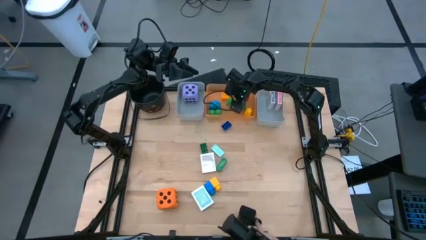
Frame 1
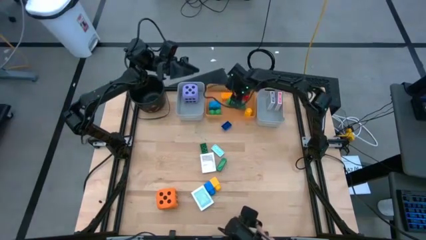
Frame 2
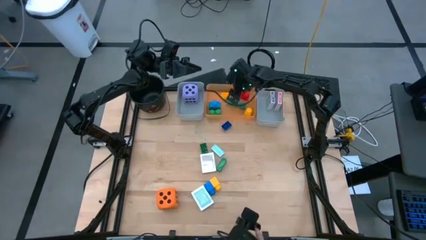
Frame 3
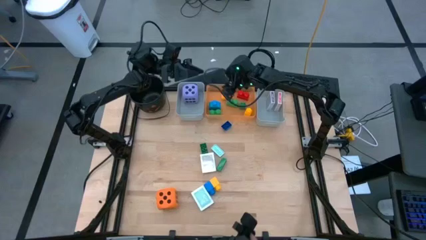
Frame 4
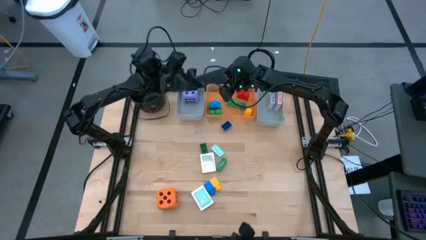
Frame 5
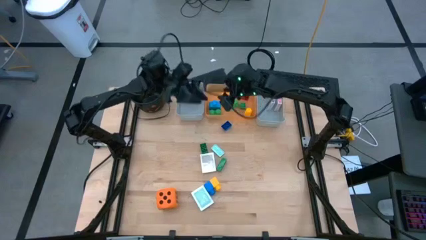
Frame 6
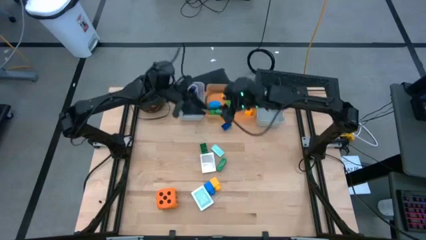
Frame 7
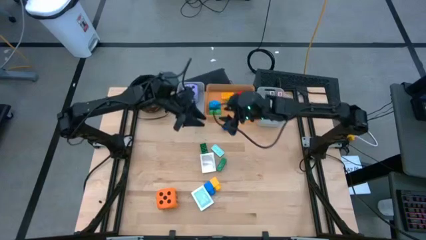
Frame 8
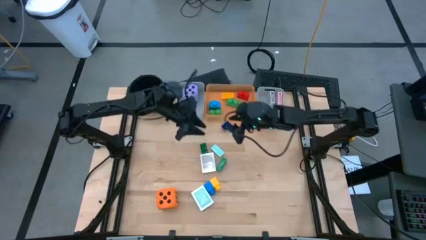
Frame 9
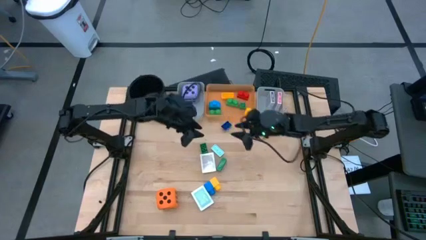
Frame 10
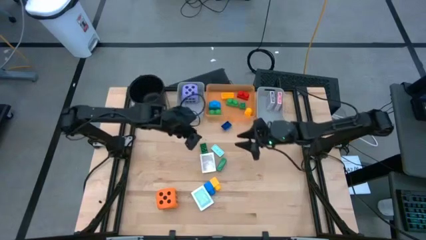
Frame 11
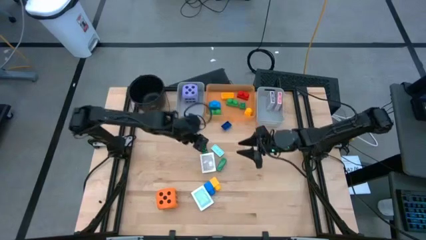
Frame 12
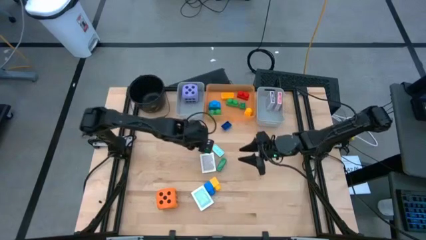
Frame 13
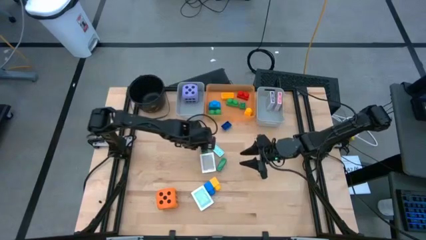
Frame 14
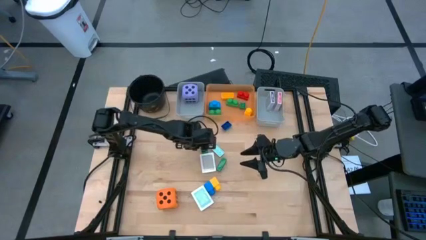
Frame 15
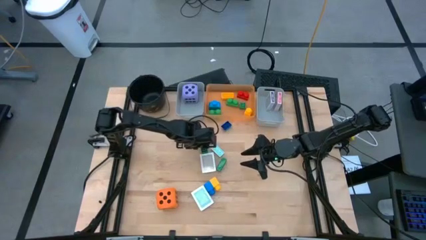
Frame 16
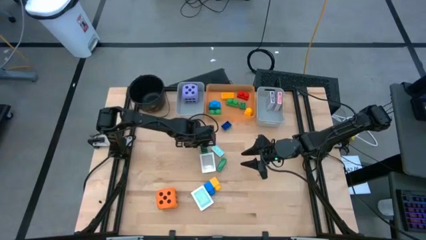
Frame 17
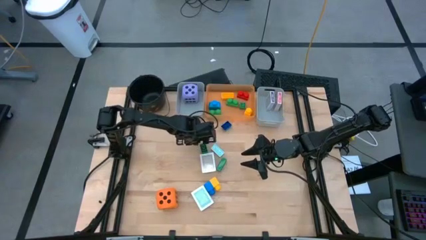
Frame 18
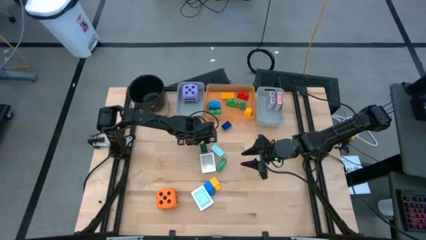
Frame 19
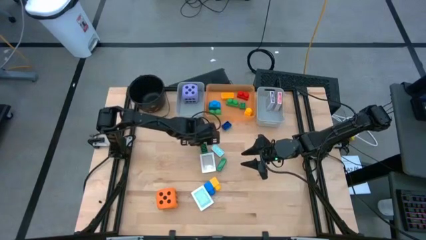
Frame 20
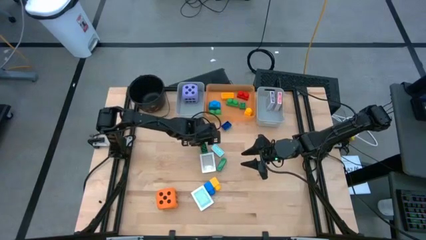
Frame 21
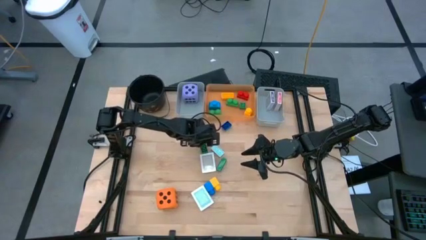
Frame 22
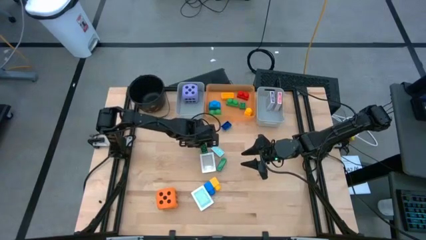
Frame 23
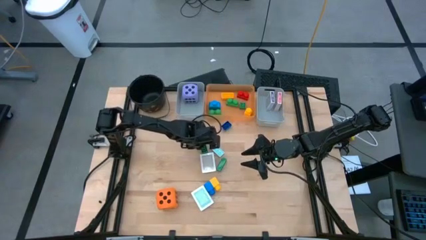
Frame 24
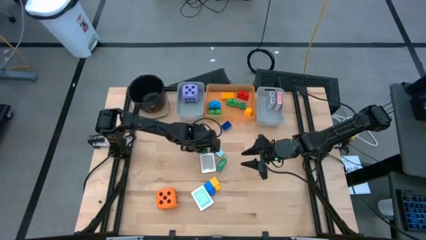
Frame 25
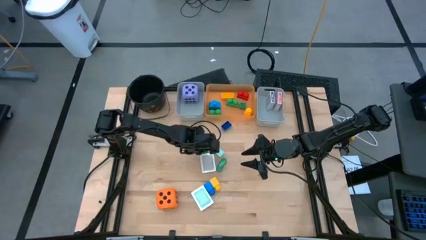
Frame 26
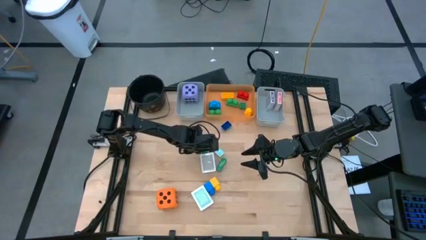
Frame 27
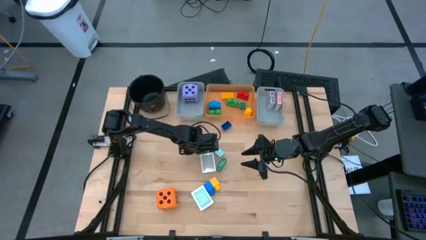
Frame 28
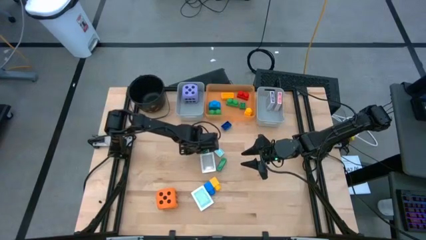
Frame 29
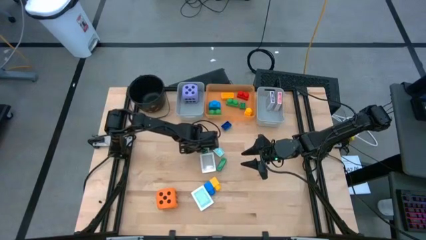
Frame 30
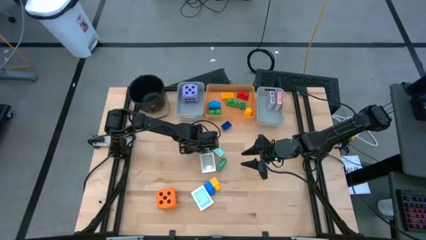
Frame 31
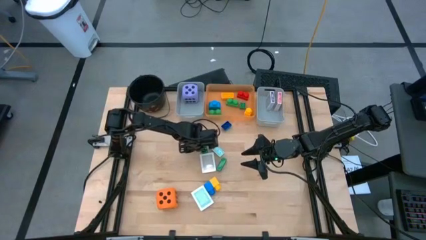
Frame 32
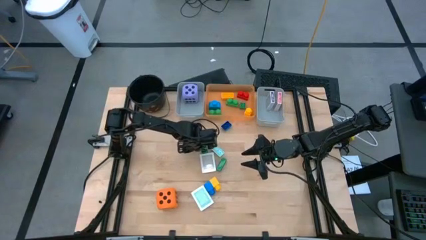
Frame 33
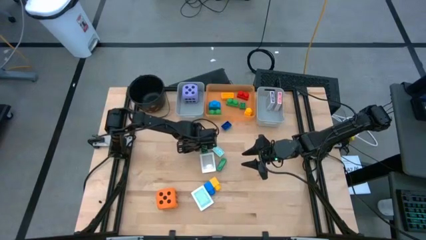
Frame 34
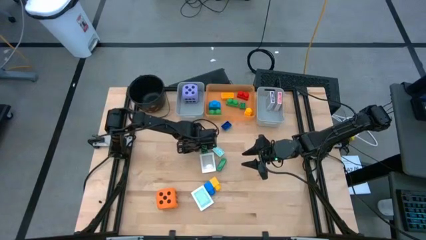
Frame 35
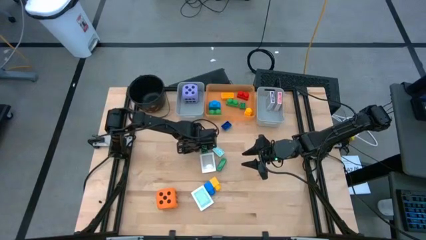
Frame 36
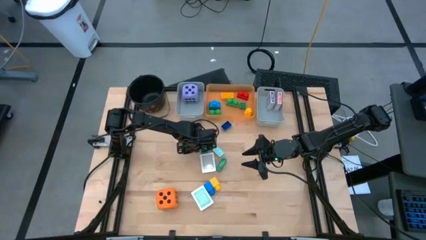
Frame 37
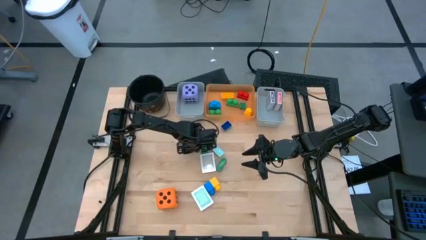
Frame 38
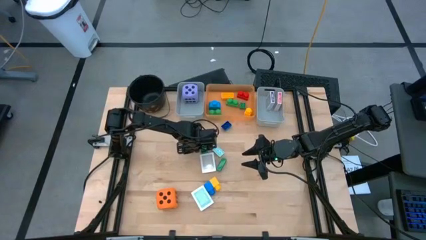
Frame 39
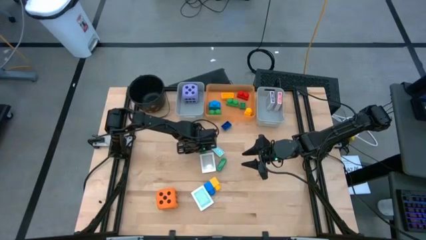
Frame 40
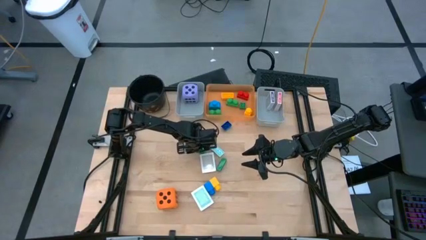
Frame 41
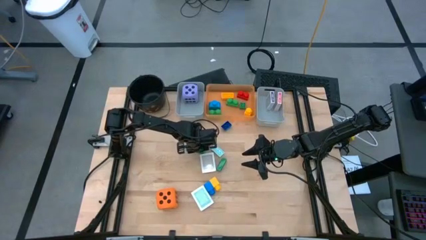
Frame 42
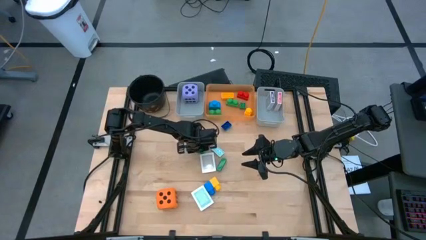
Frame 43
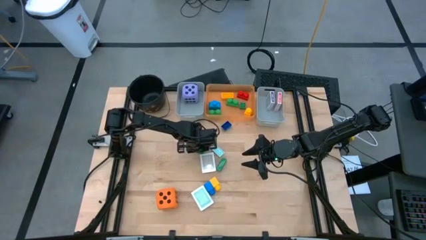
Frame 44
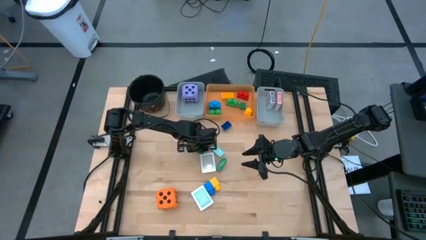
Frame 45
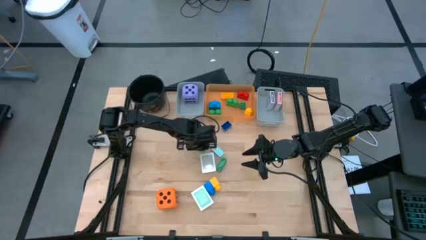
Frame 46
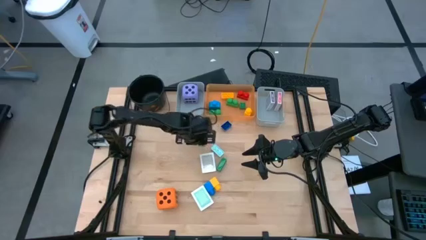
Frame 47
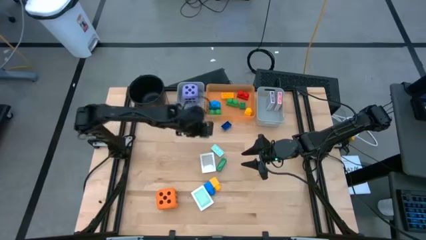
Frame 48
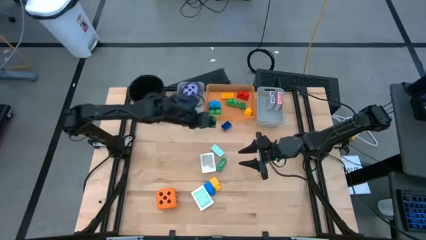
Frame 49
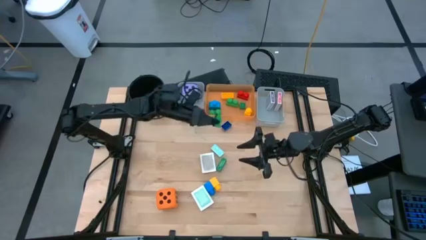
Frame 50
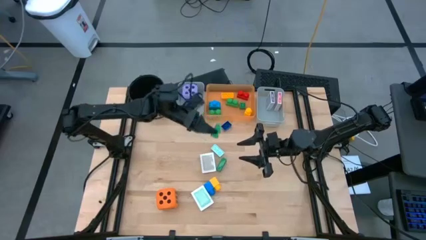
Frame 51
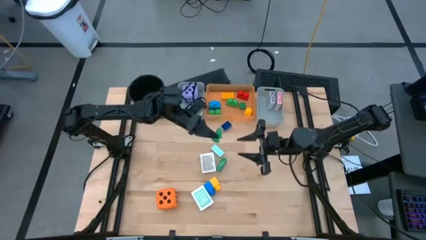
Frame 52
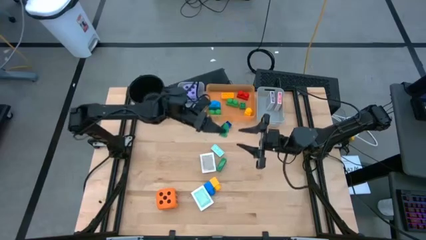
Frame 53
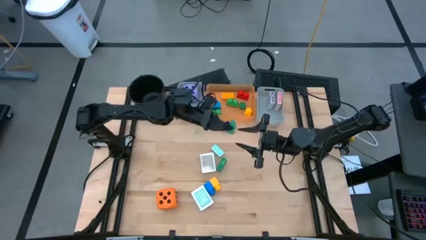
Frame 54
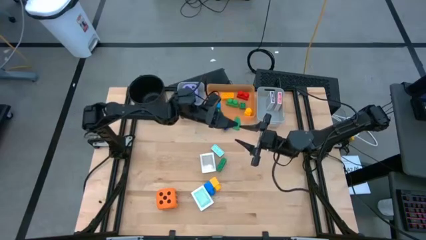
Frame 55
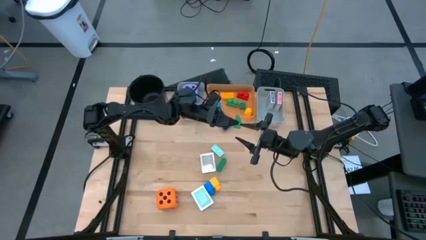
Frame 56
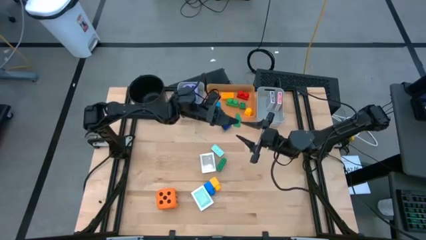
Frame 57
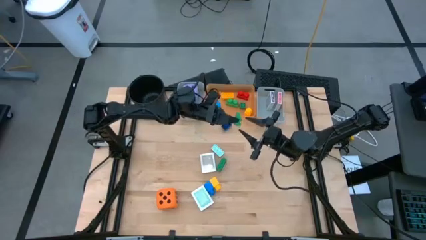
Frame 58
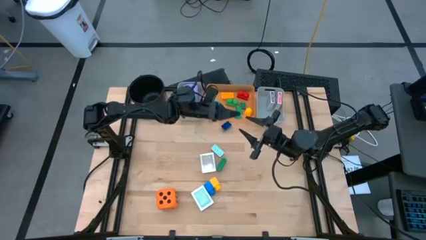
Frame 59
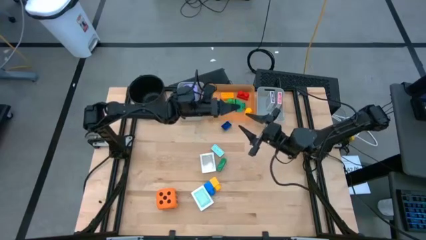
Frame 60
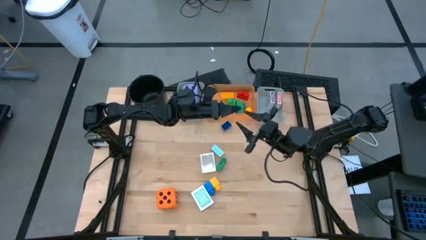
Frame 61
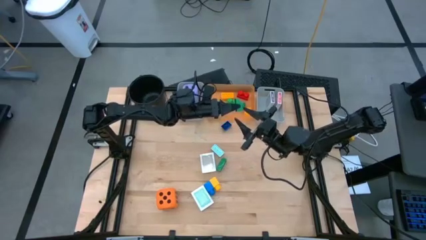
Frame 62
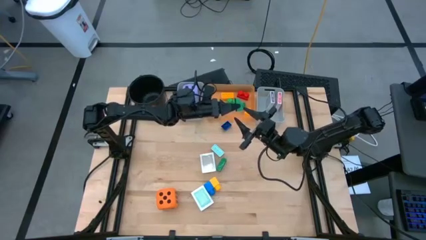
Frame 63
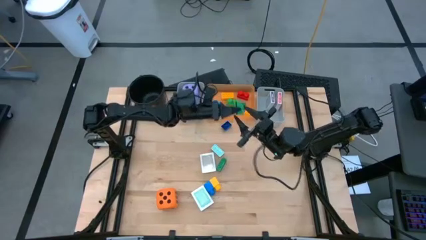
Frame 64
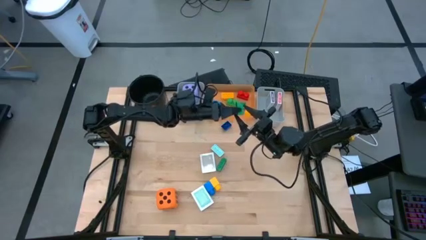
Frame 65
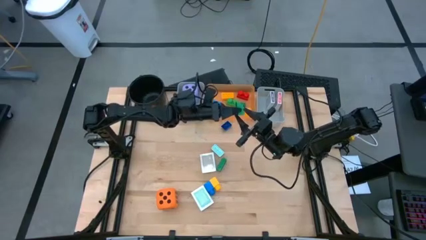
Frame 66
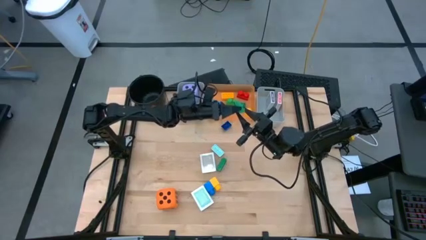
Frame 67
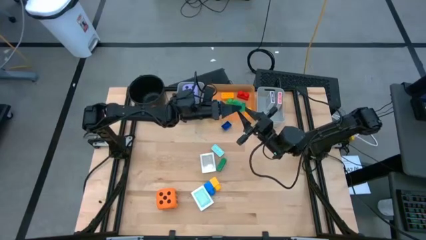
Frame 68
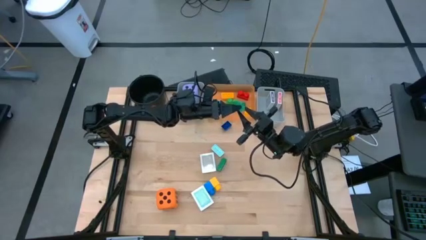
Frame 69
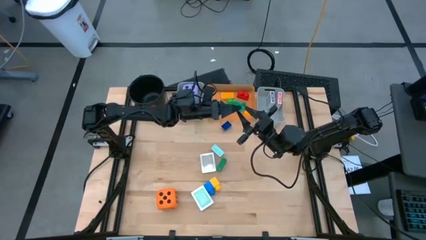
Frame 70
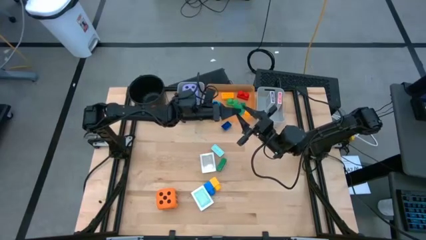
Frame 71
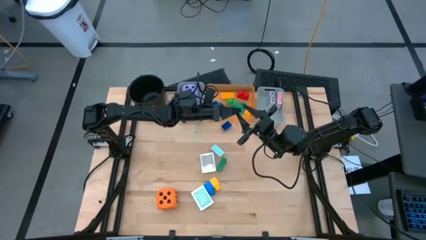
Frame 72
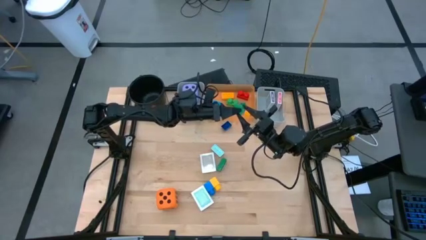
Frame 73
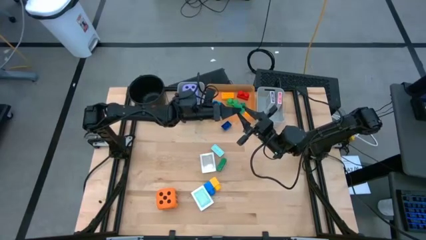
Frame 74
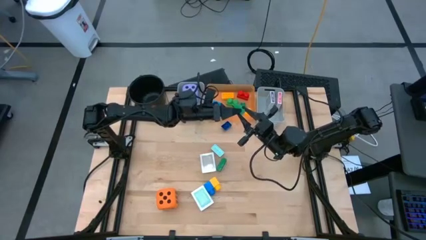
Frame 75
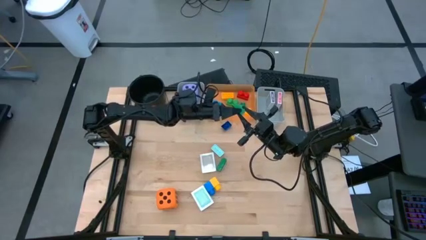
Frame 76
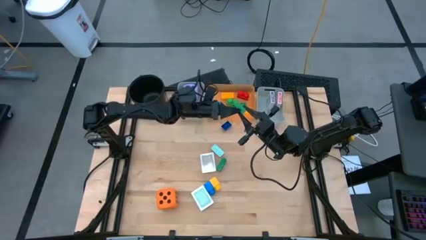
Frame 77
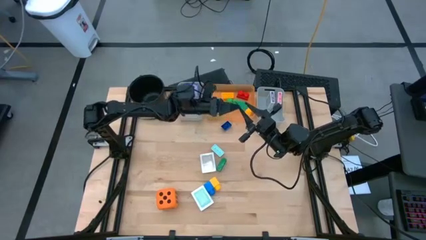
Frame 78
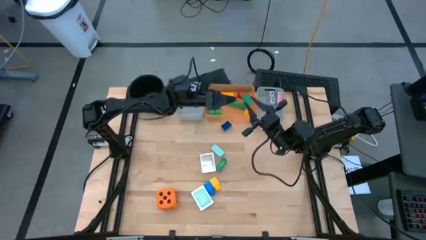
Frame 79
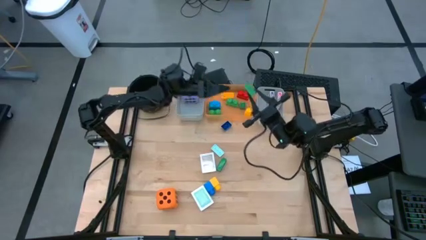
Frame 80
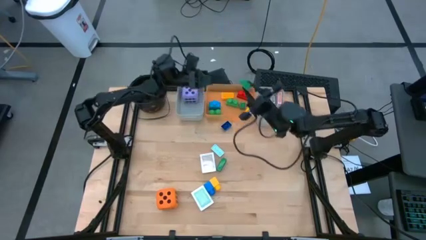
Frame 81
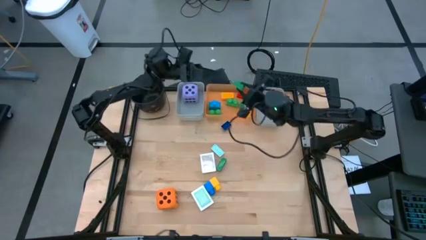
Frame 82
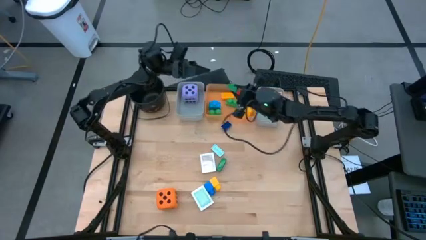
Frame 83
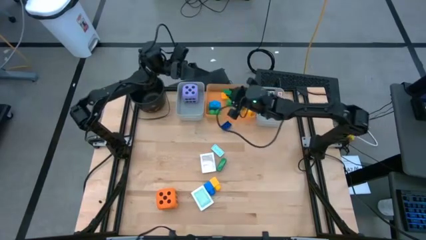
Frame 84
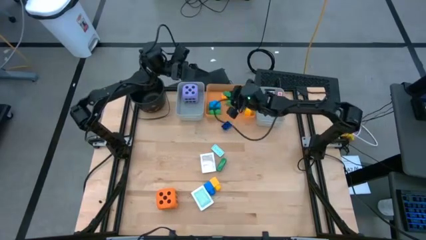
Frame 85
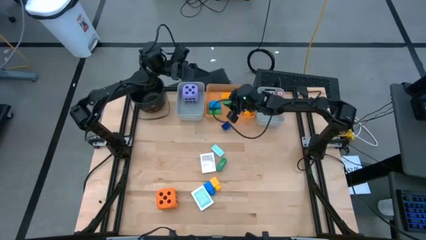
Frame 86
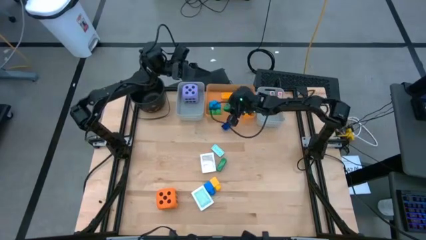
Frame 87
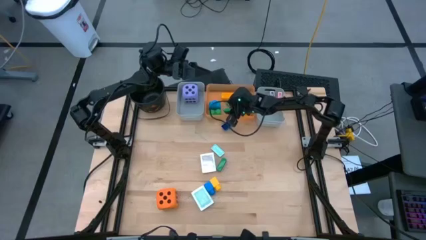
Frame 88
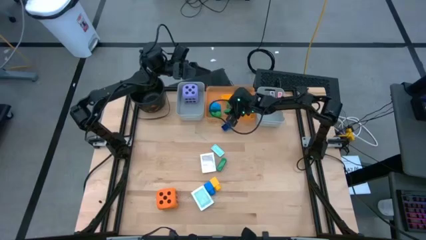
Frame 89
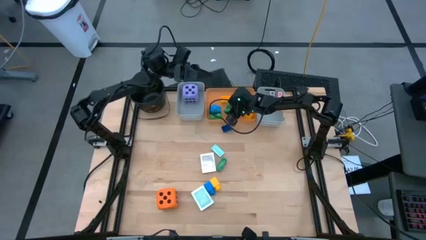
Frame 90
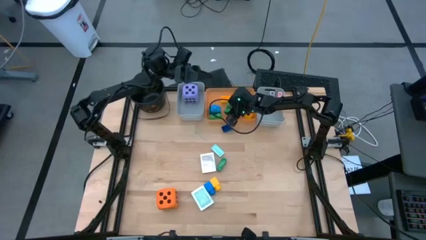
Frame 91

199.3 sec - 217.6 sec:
Task: Pick & Place Toys
Put the top dark green game piece into the orange bin
